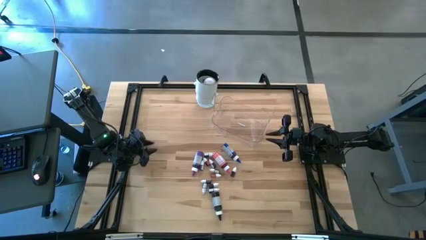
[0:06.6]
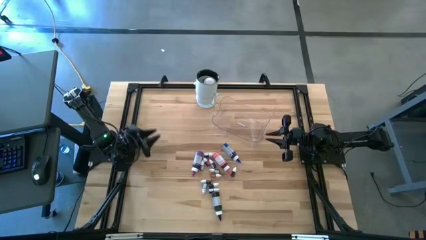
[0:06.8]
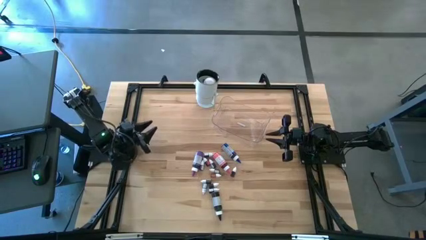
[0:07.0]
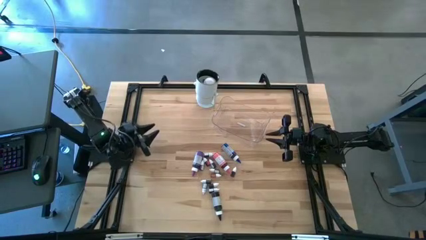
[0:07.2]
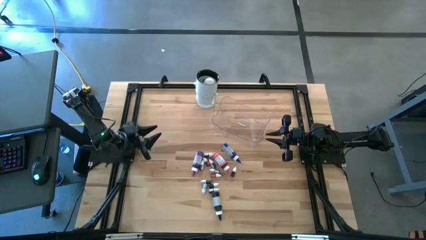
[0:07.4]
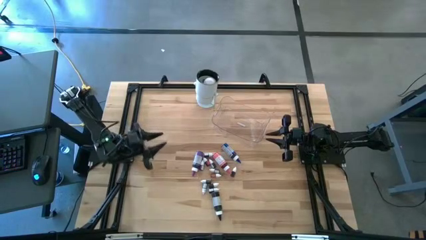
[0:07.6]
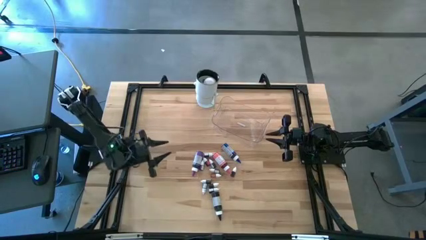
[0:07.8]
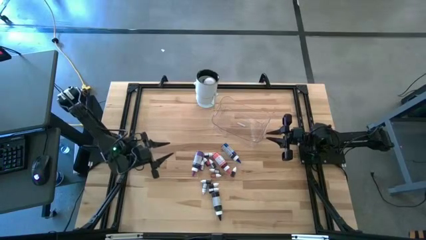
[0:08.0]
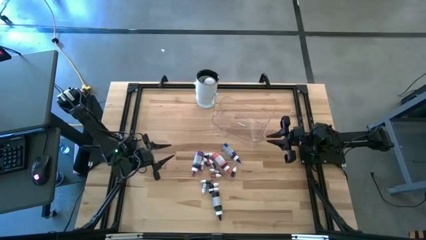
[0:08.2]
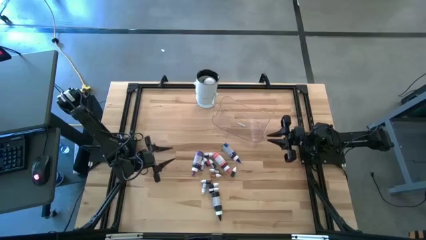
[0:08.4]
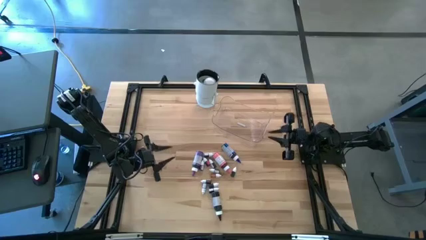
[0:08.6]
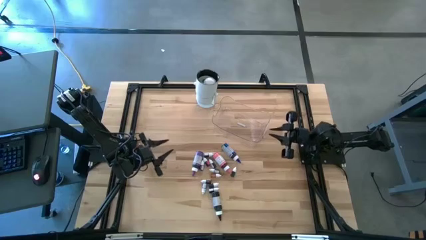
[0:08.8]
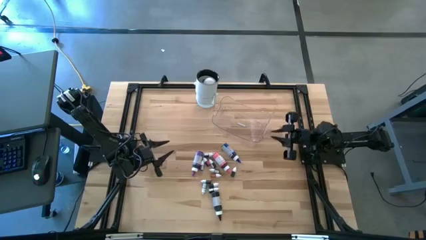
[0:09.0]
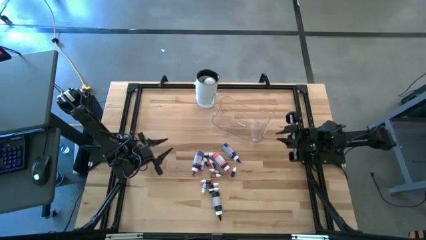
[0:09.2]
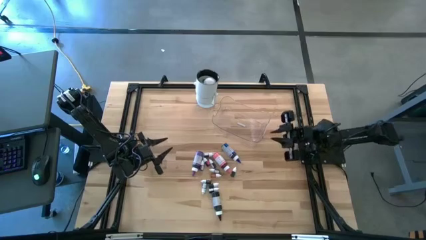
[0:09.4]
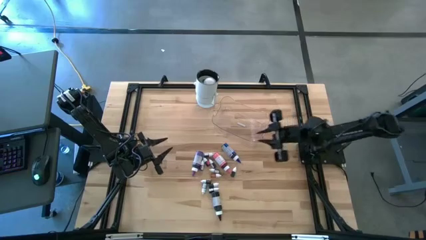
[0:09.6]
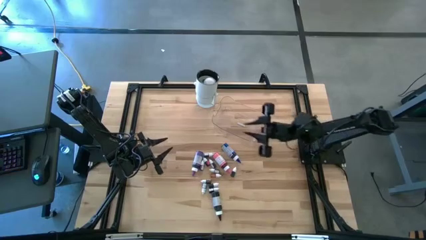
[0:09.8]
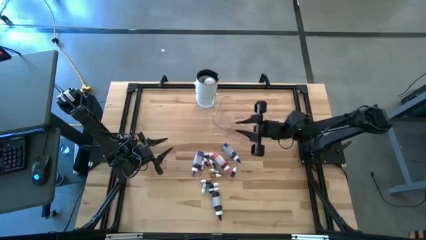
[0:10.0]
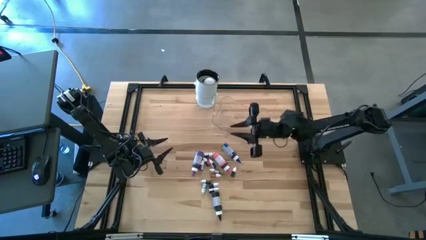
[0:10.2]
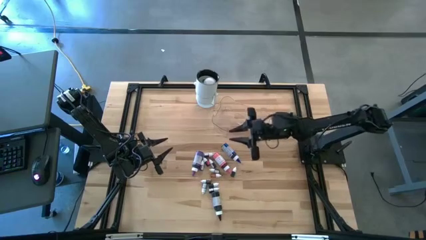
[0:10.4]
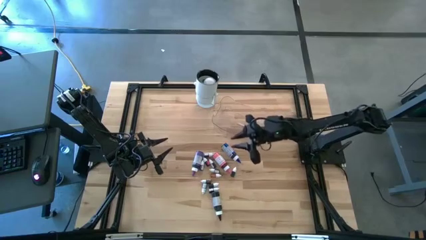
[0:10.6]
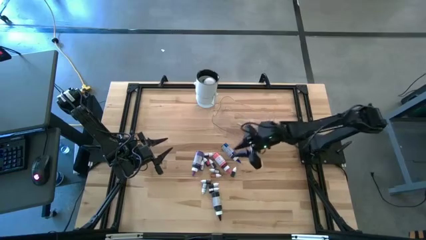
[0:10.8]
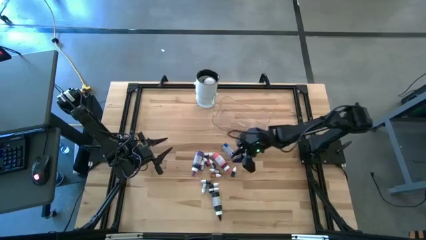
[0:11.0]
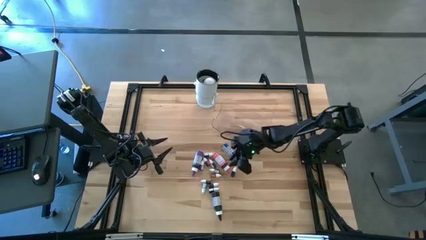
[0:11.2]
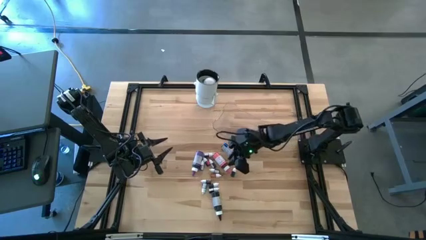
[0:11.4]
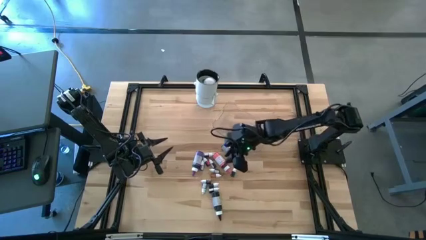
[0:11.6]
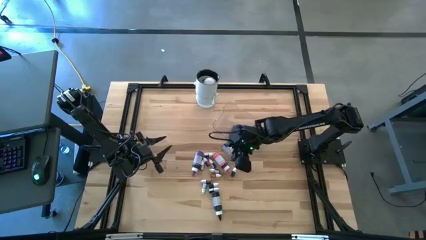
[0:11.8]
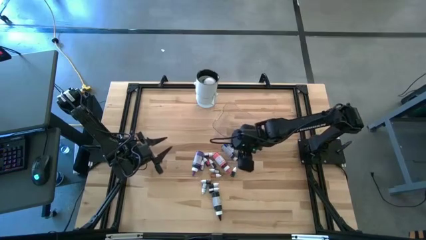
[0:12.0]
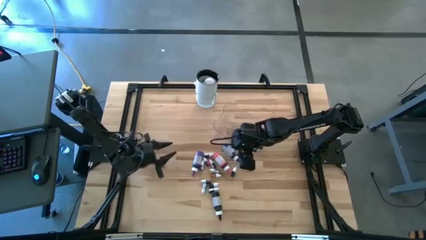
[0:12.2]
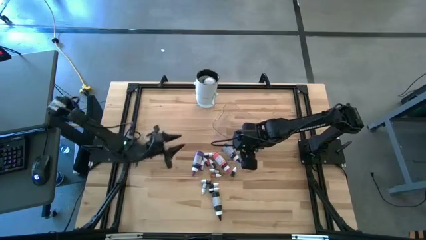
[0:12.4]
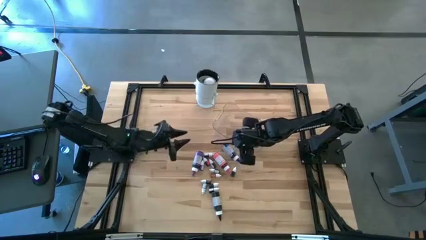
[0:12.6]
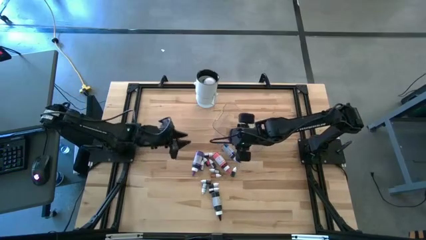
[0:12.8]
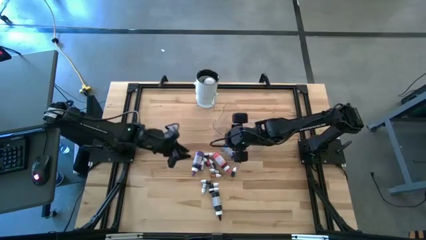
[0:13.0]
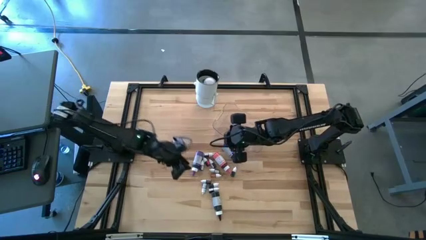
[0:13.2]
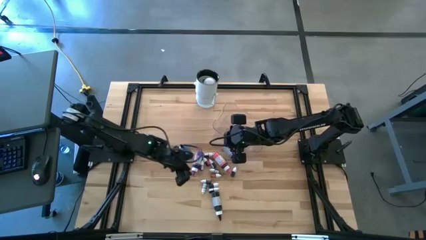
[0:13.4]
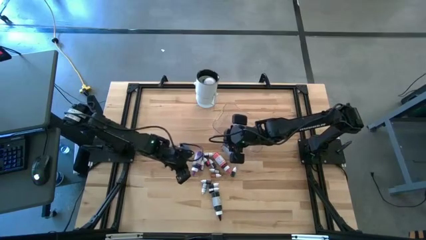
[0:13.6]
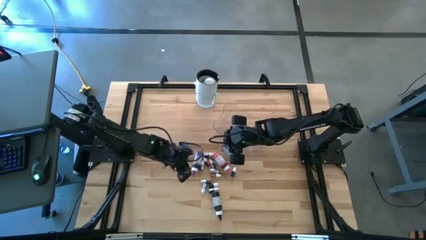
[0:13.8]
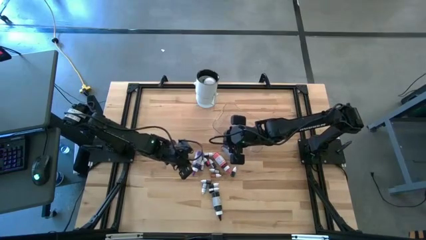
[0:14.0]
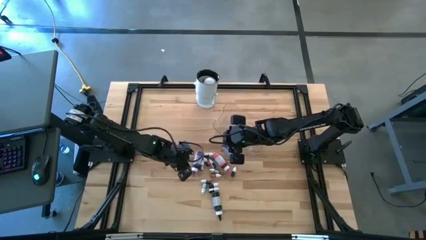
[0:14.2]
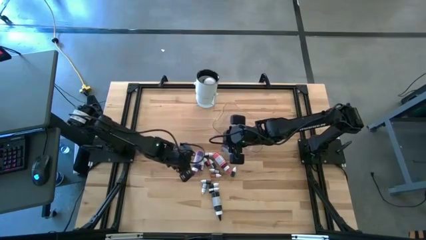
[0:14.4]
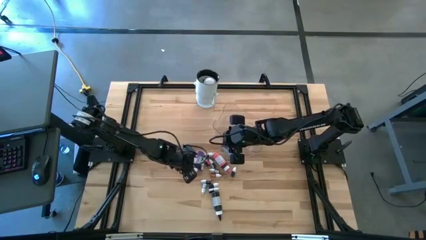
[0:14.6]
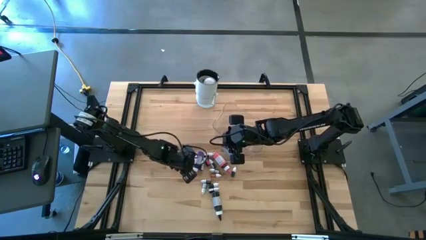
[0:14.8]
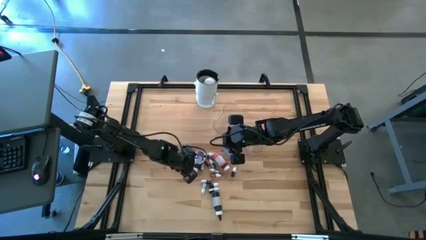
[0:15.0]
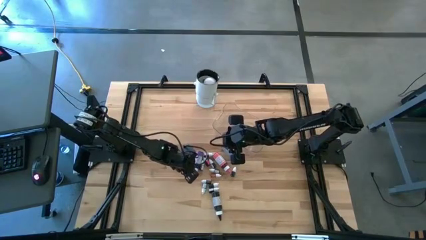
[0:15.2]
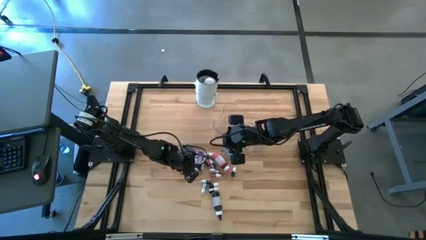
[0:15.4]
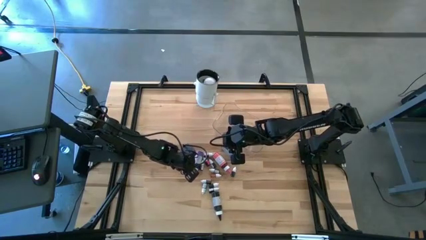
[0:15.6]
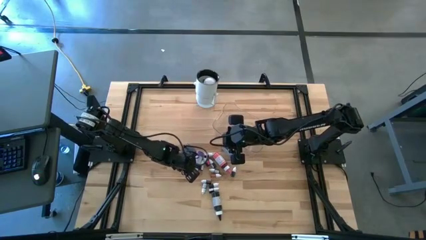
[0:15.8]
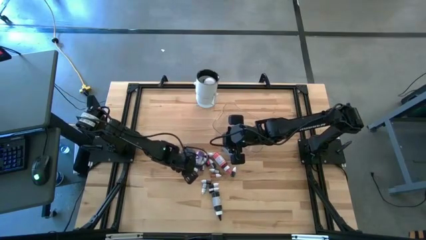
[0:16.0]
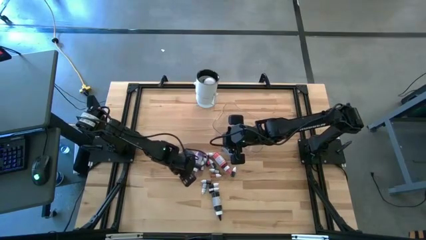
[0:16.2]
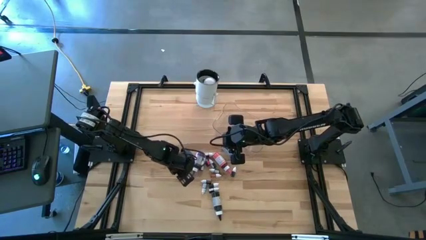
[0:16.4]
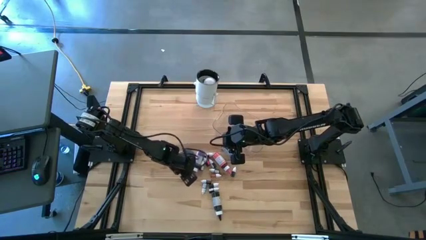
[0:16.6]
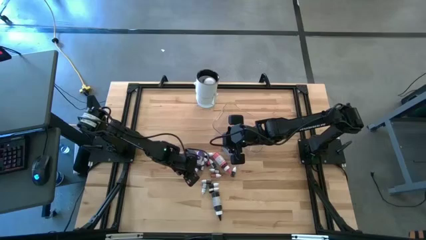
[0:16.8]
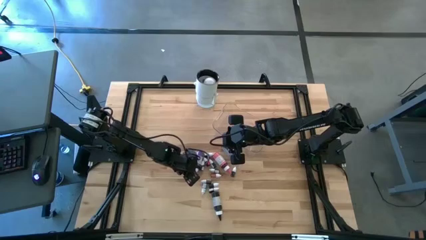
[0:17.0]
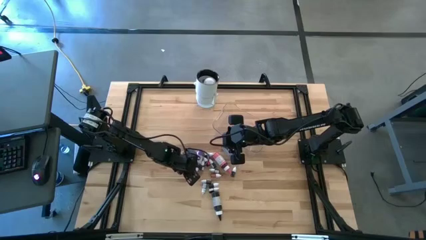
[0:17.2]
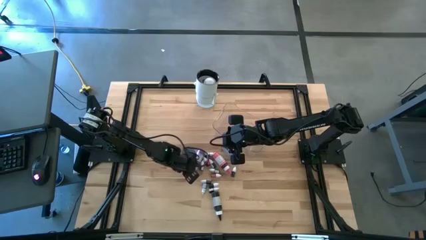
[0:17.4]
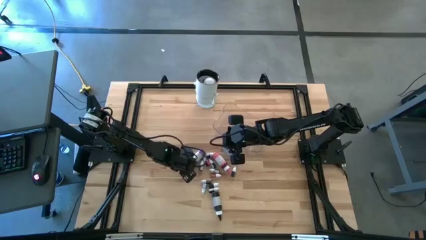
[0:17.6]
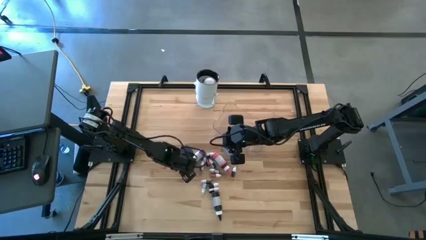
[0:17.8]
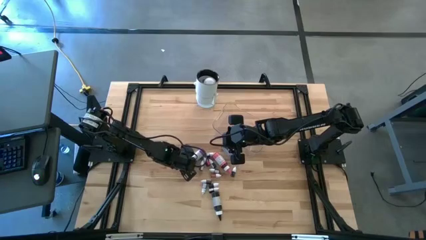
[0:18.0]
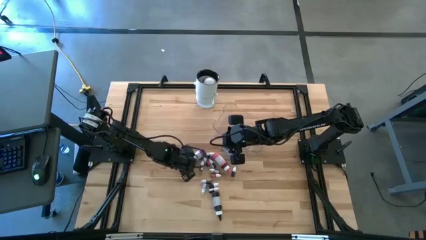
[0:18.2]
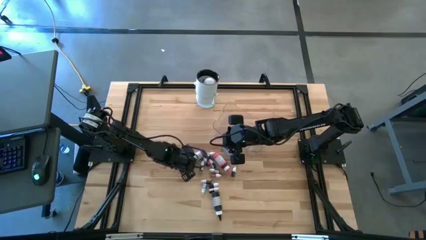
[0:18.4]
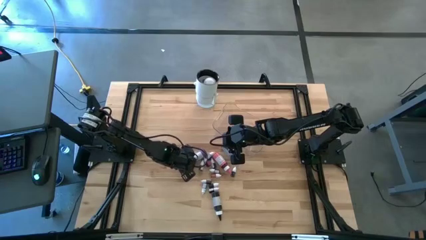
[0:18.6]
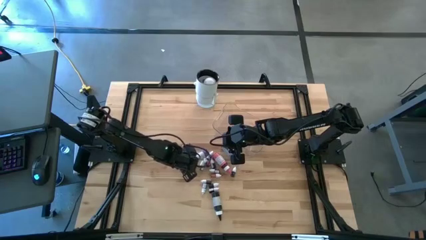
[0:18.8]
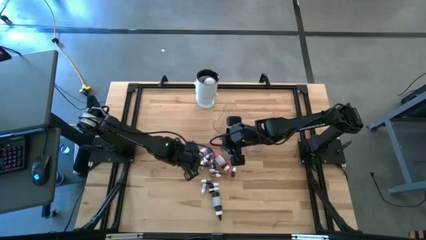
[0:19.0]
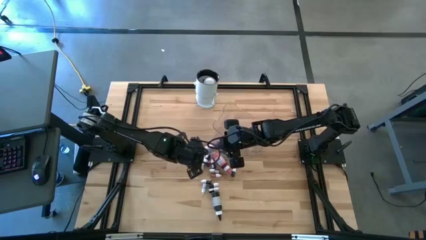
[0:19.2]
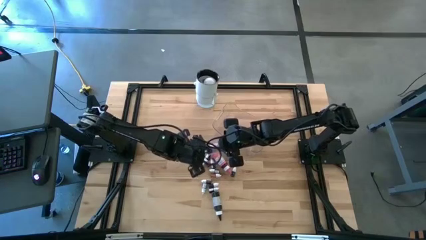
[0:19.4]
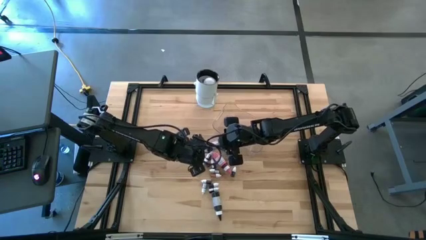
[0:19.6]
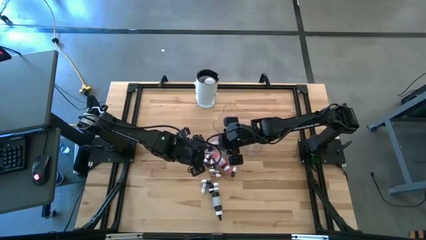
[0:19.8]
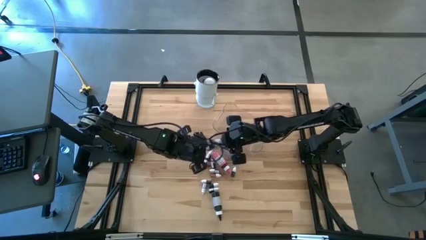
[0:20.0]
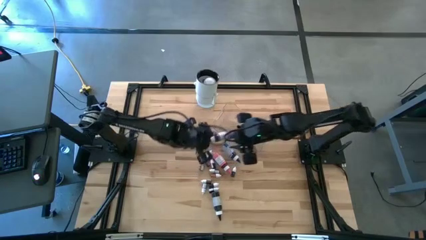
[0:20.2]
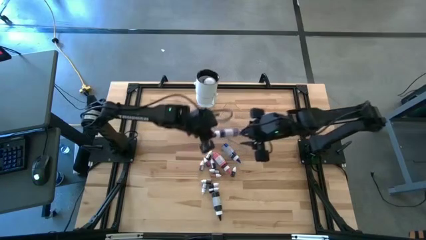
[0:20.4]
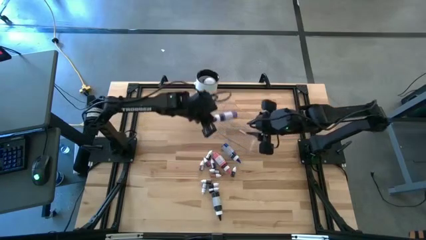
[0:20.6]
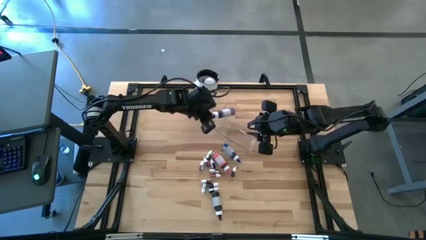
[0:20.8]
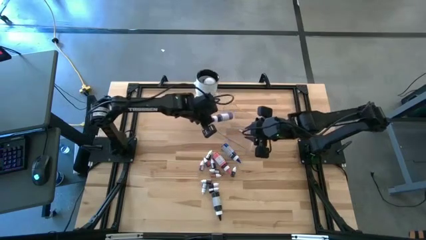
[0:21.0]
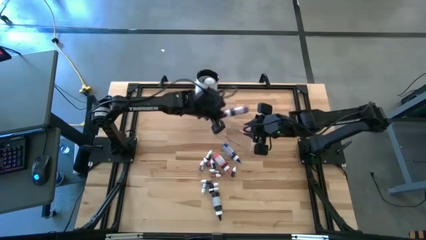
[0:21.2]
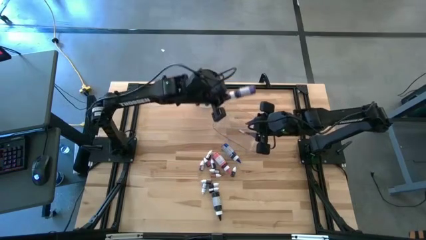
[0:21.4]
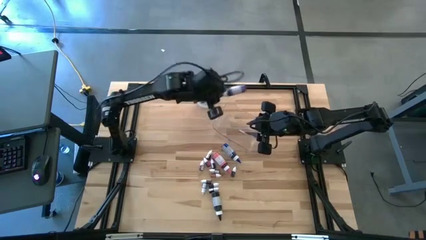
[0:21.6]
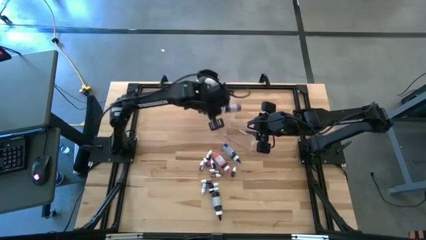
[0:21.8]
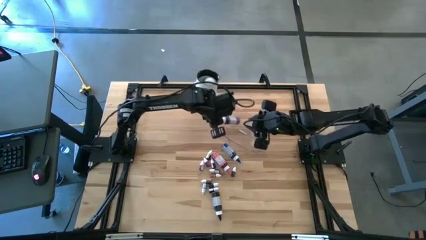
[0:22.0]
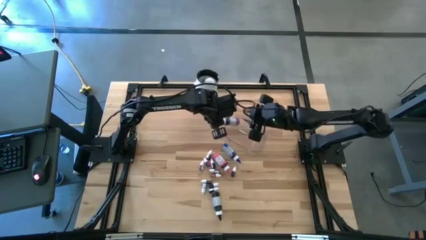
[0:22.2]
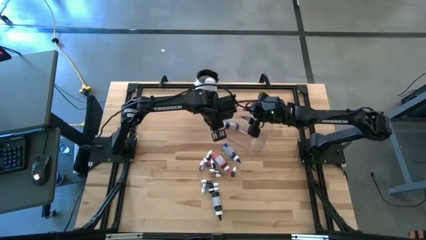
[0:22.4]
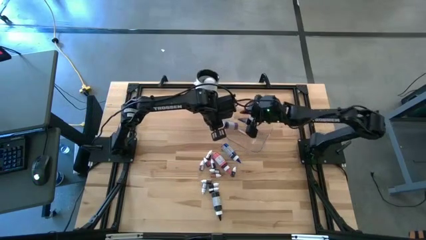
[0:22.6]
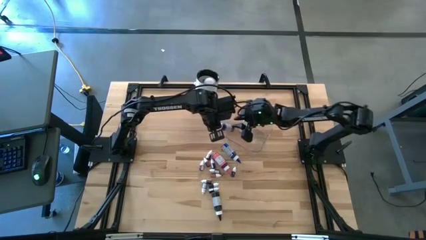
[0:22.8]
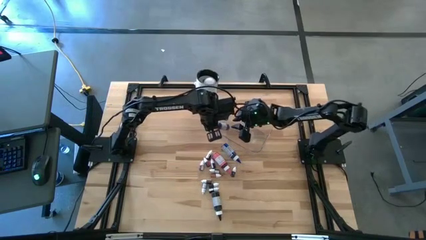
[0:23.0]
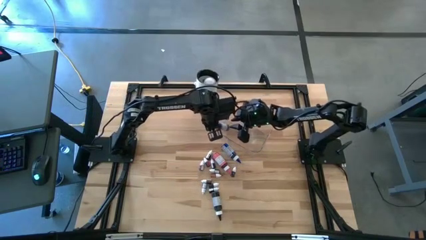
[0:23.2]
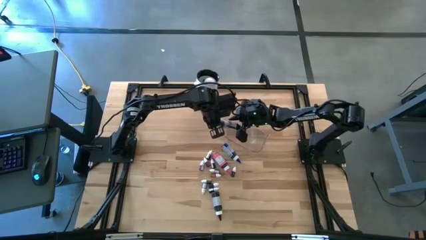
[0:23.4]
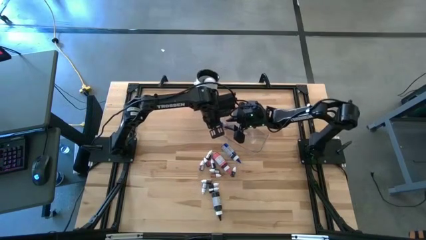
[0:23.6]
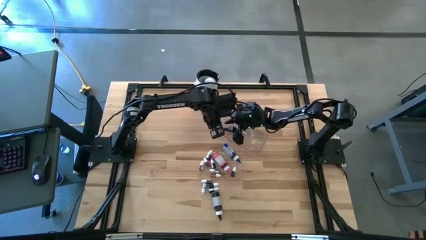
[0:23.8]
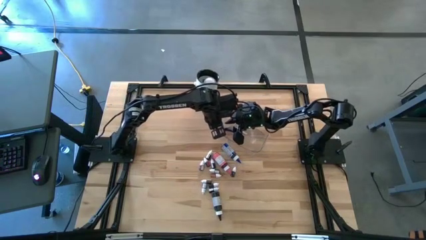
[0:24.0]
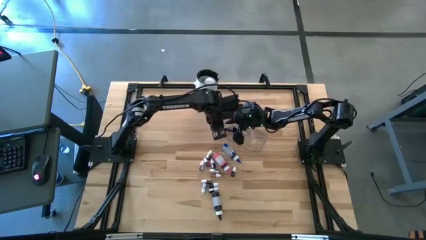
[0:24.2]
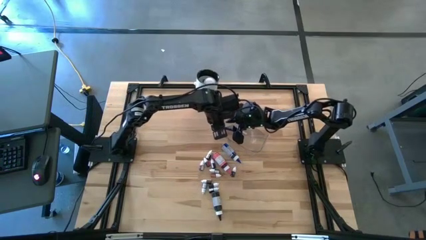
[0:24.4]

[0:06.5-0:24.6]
Task: Pick & Place food coloring
Put the large purple food coloring bottle into the transparent container
